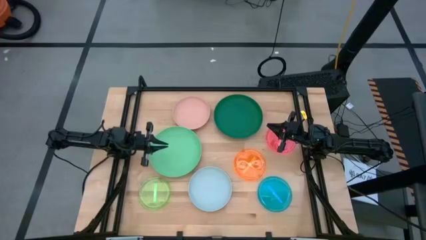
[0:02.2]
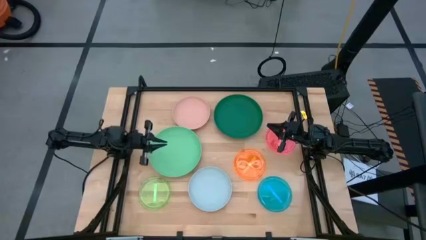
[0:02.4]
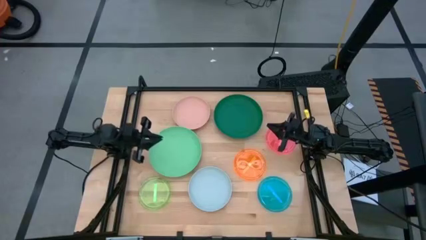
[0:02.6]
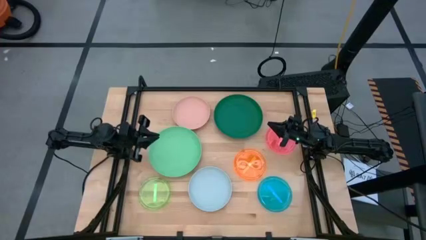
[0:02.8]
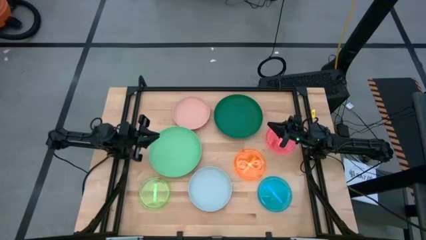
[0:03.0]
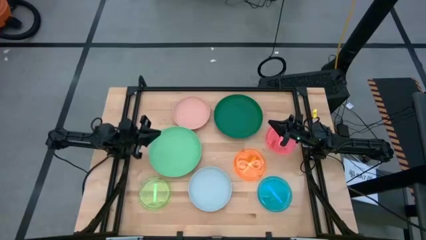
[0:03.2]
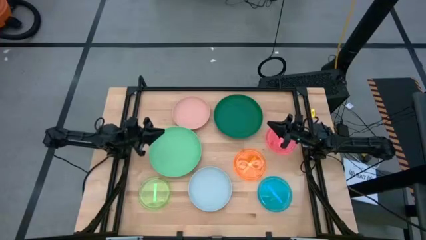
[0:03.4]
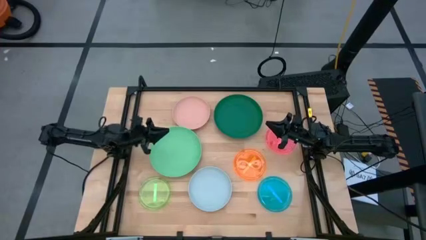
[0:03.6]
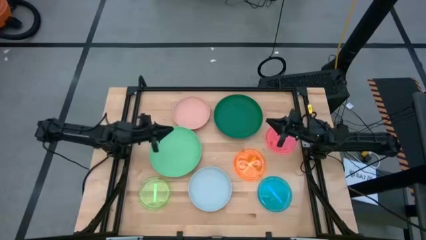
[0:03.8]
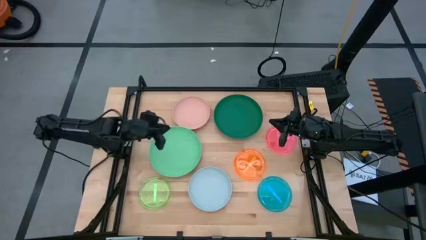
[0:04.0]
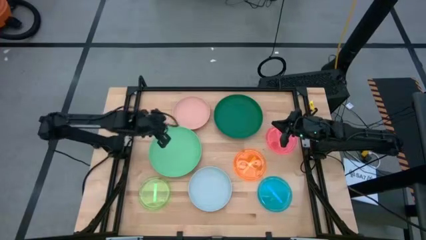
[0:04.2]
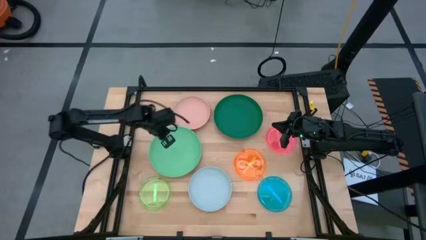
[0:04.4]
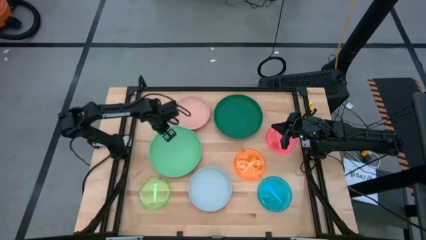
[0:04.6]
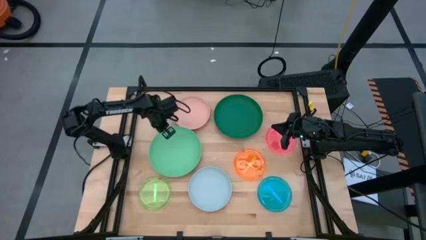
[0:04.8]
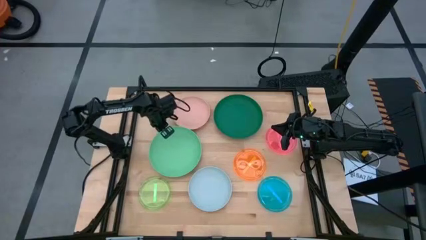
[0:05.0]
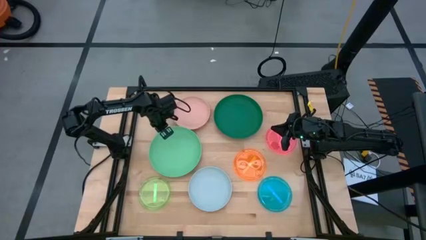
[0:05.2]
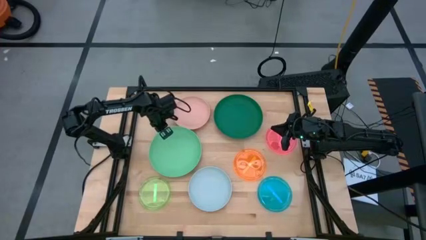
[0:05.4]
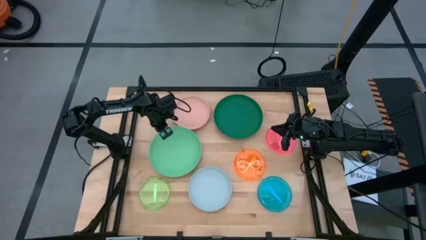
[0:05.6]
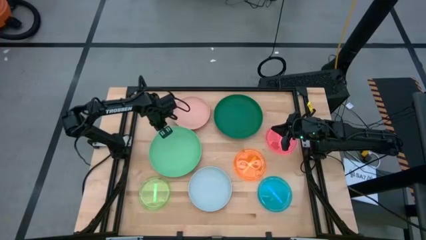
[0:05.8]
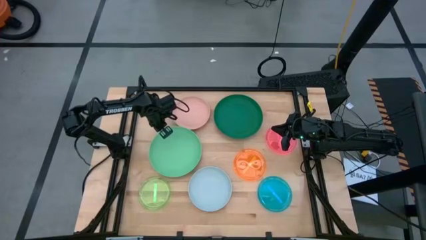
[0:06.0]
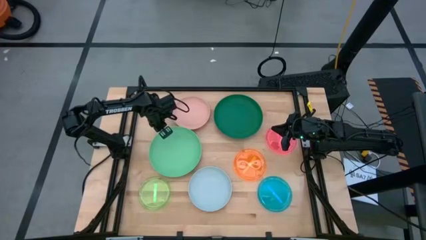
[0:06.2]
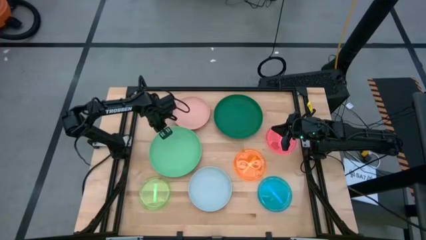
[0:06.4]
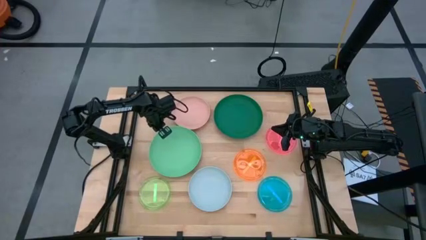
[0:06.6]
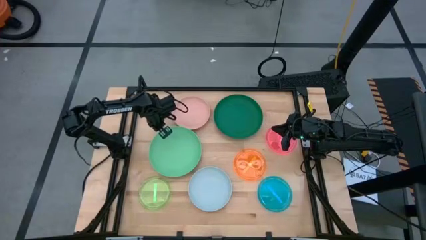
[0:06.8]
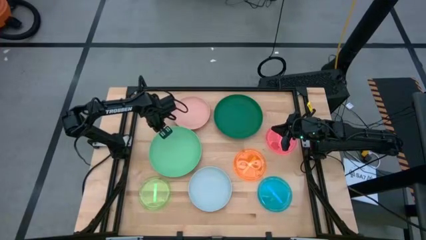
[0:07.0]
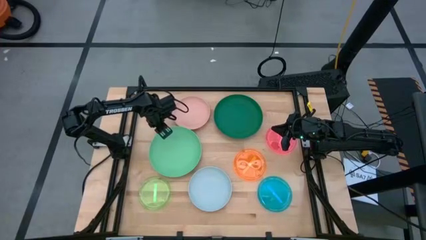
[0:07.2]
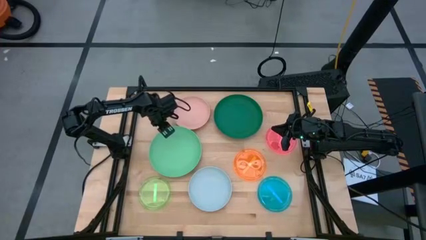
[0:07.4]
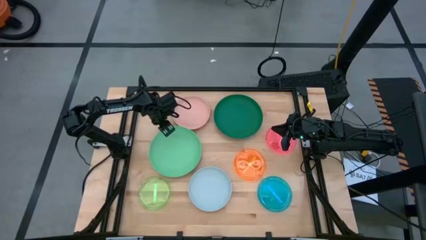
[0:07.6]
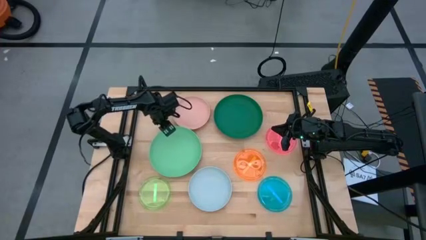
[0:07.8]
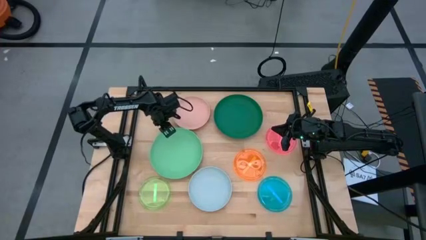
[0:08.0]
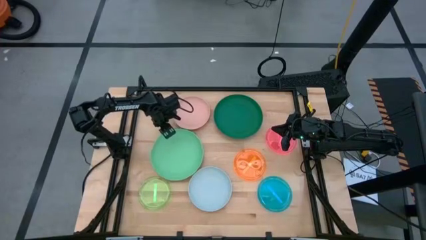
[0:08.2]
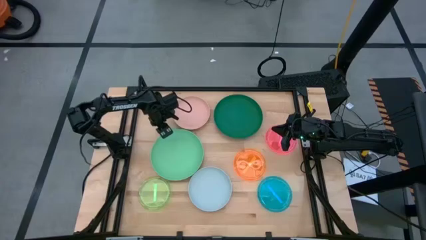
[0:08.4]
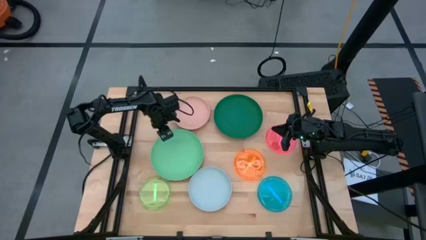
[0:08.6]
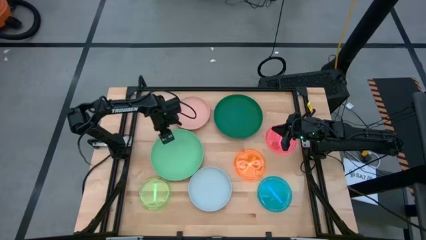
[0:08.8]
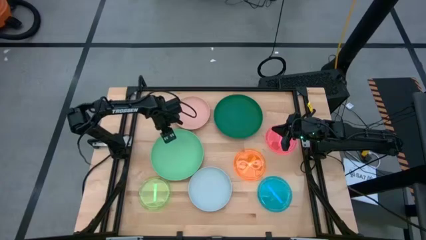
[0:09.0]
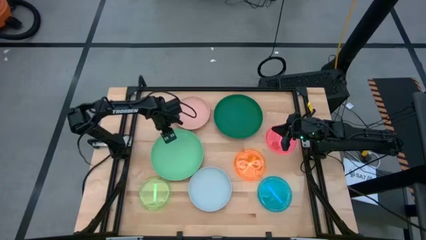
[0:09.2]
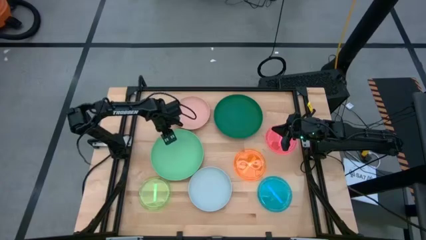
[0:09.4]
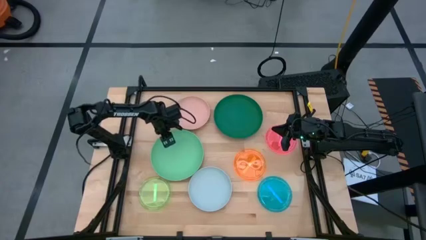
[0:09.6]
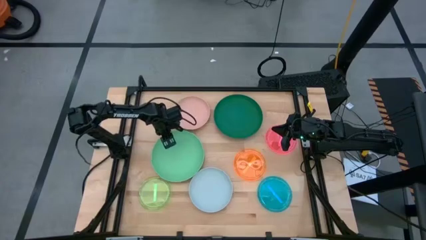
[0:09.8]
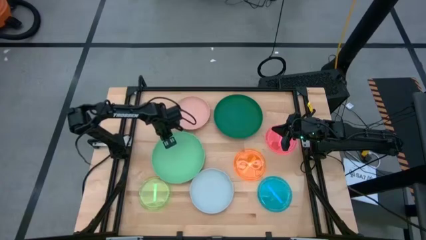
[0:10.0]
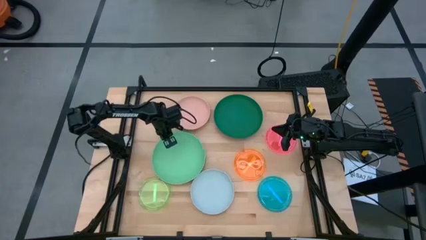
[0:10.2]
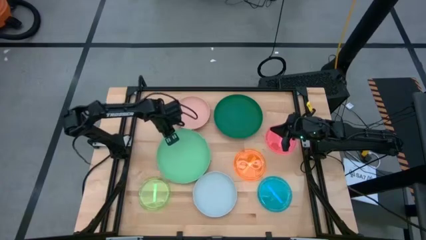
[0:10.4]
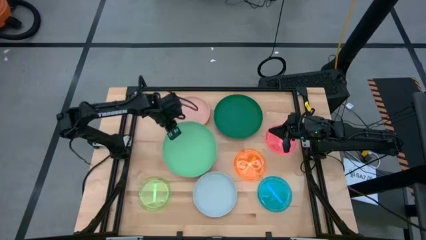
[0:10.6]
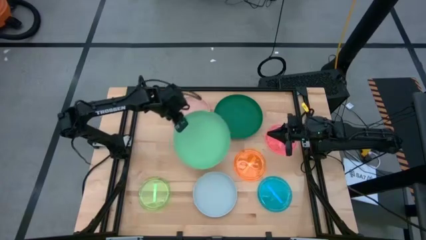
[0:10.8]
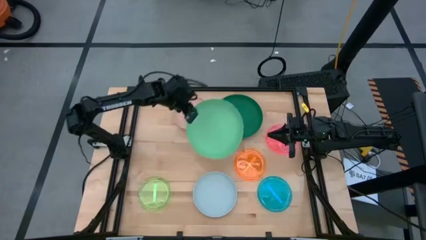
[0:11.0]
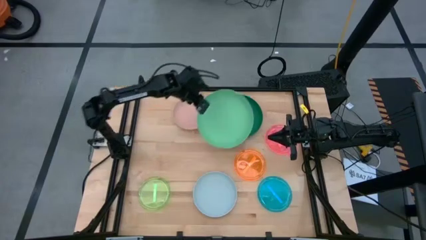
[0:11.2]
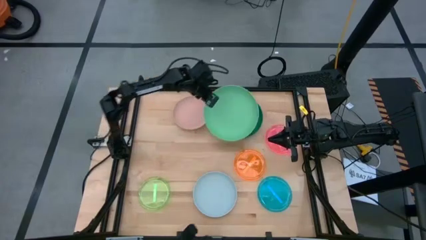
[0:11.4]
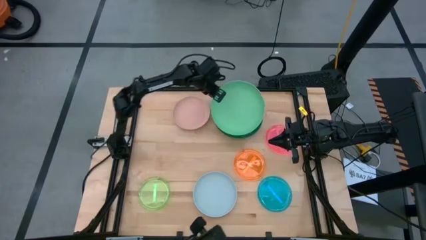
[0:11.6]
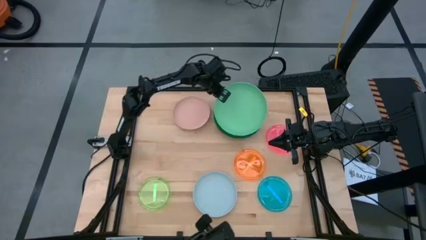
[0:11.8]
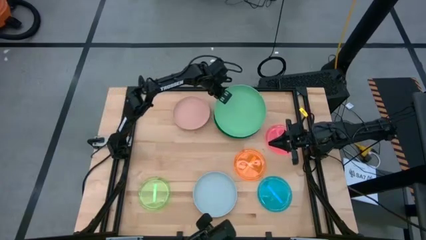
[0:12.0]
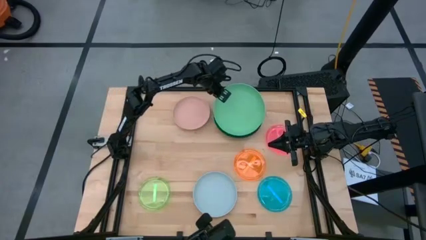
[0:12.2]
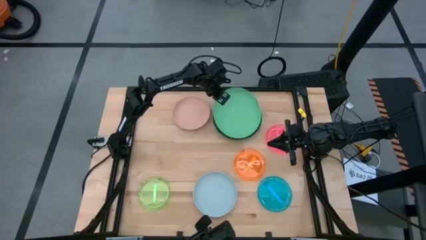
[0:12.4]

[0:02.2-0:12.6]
Task: Stack plastic plates
Stack the green plate on top of the dark green plate

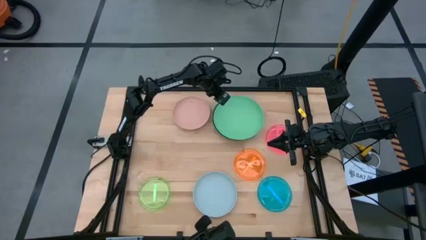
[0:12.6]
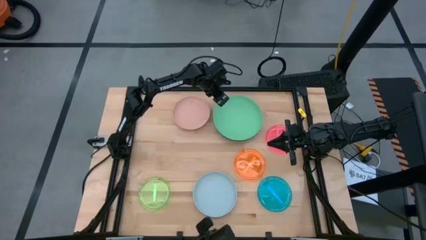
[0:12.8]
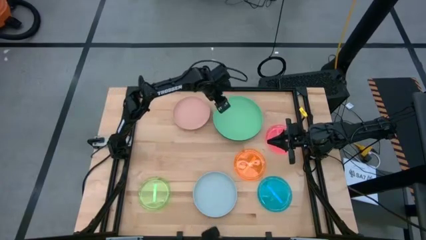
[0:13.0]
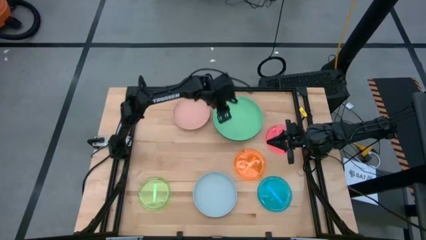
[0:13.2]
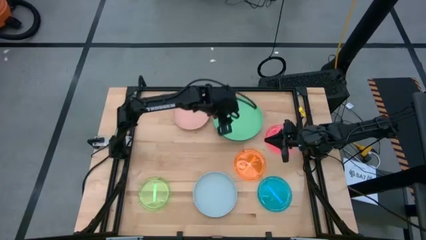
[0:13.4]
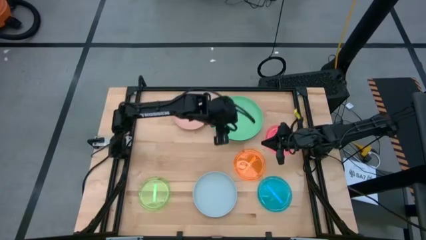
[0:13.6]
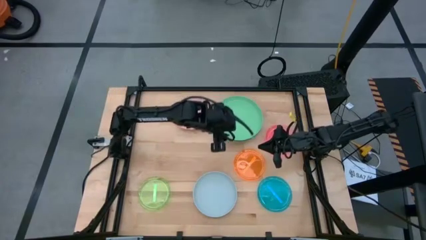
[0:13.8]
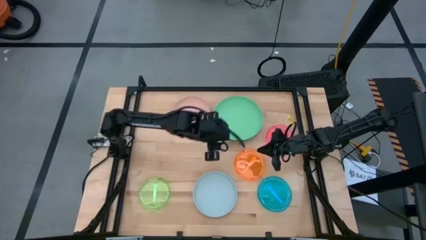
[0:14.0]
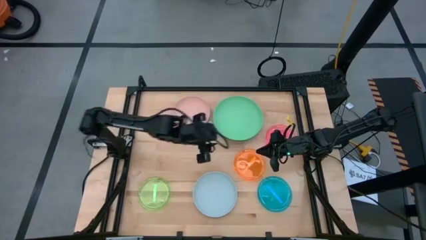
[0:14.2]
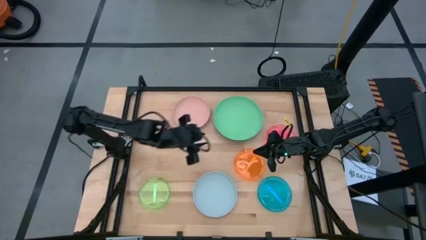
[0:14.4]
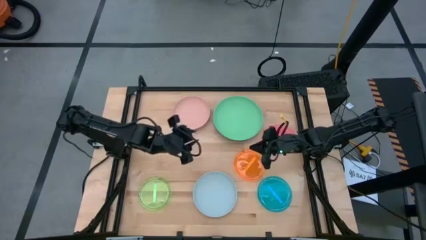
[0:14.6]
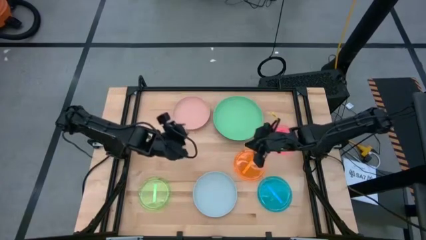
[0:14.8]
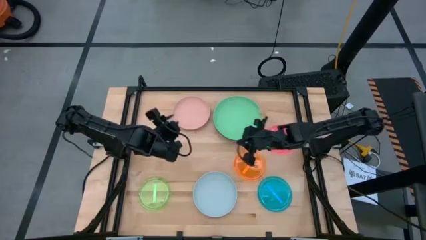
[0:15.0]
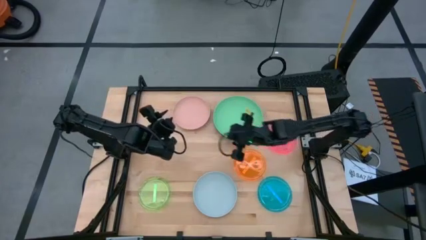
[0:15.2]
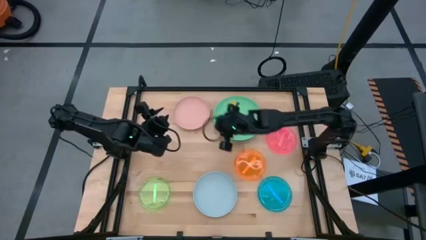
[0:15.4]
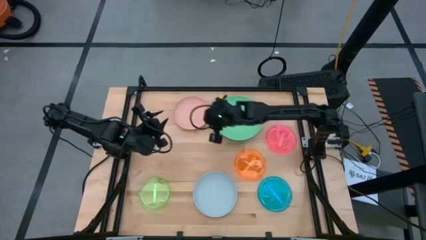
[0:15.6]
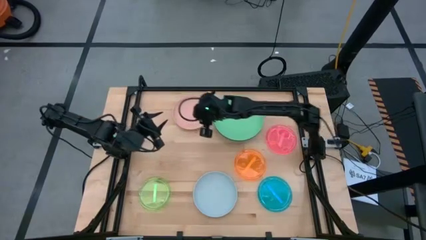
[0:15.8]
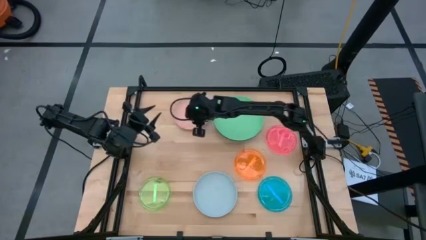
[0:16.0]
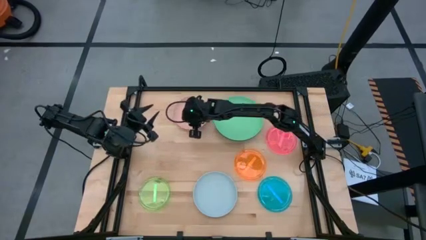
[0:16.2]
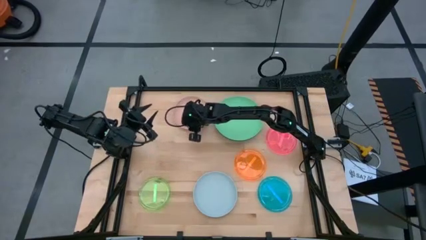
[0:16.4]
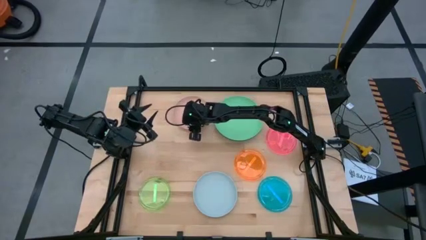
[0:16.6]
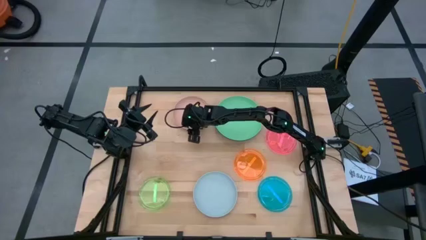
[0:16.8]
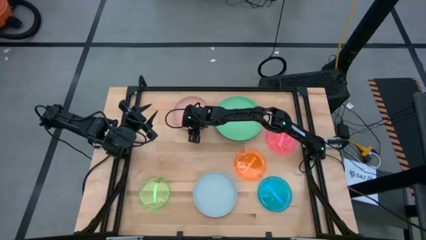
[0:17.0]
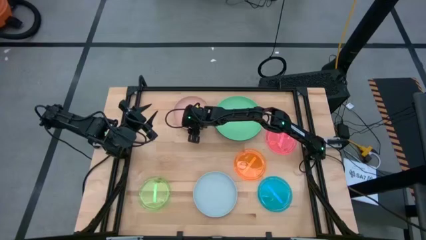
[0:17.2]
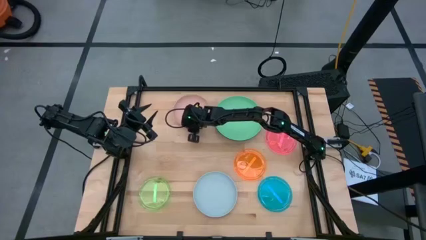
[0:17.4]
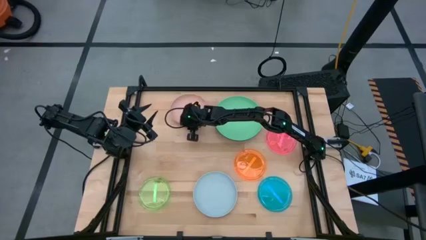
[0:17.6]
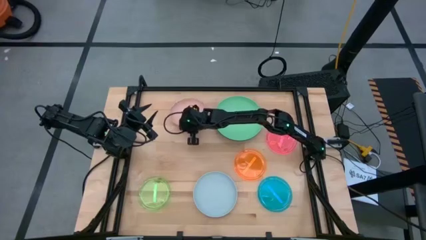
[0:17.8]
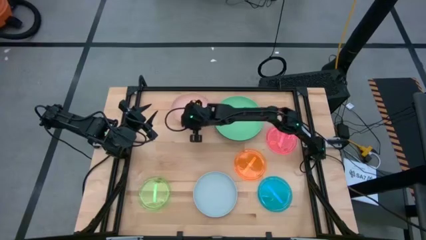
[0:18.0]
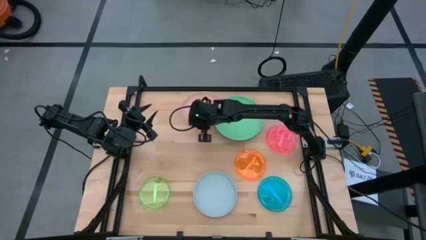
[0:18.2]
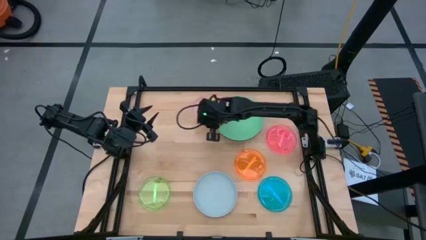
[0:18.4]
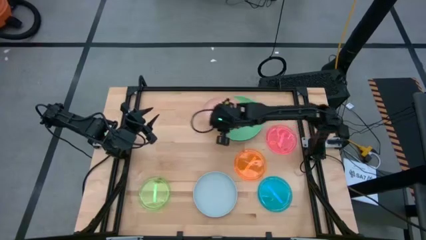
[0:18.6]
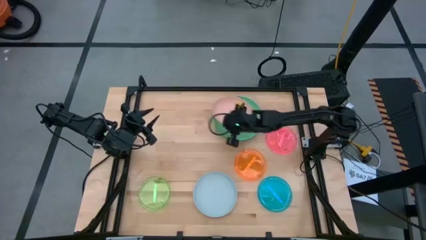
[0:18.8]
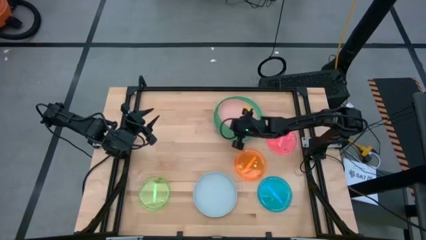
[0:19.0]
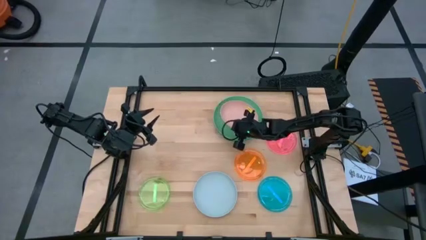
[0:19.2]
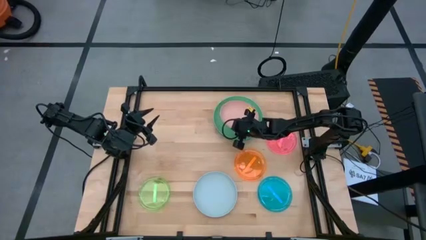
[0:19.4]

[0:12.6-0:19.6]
Stack the light orange plate on top of the green plate
